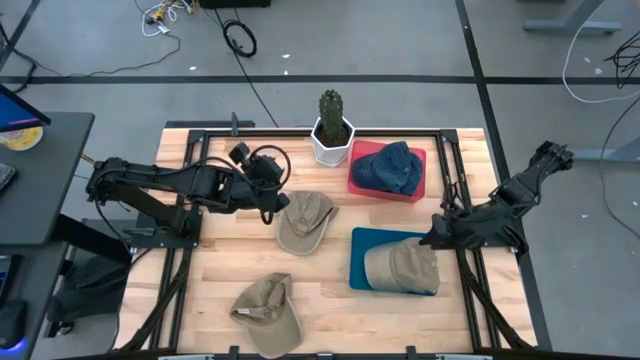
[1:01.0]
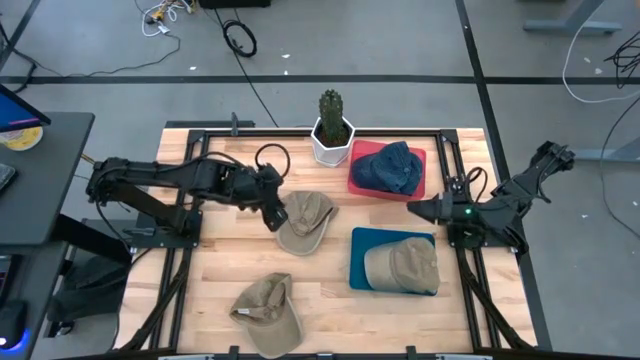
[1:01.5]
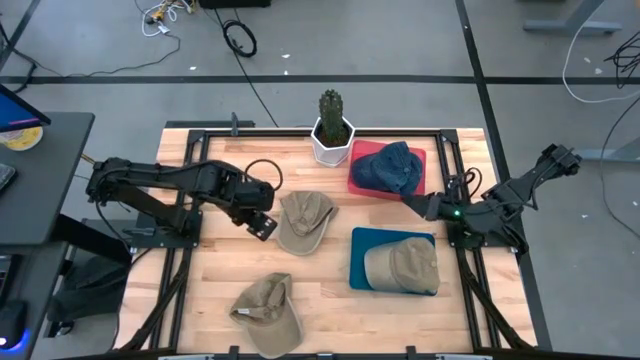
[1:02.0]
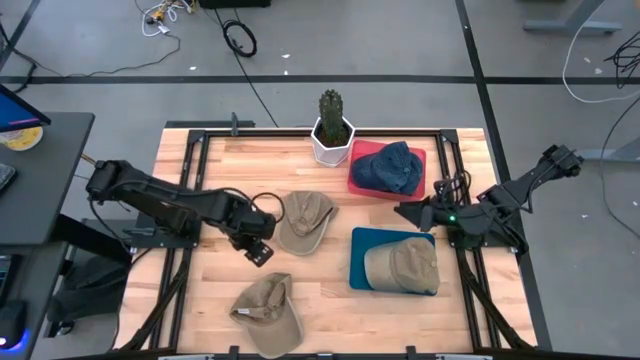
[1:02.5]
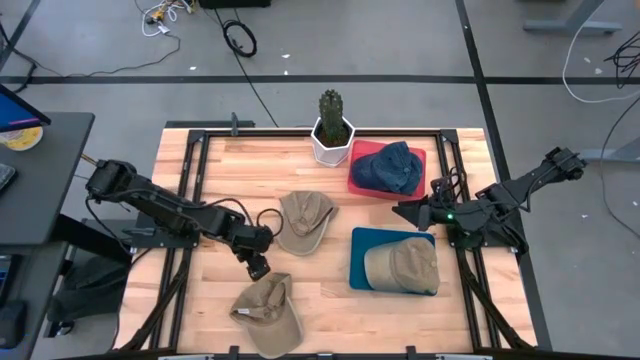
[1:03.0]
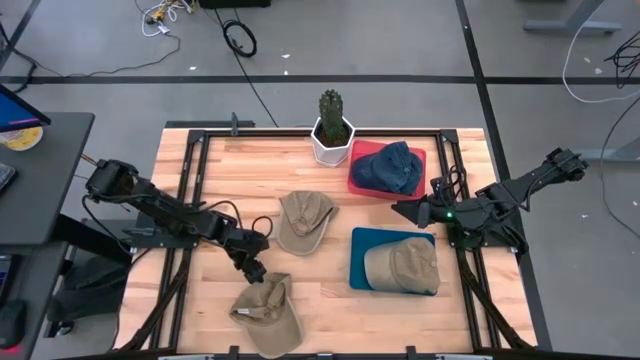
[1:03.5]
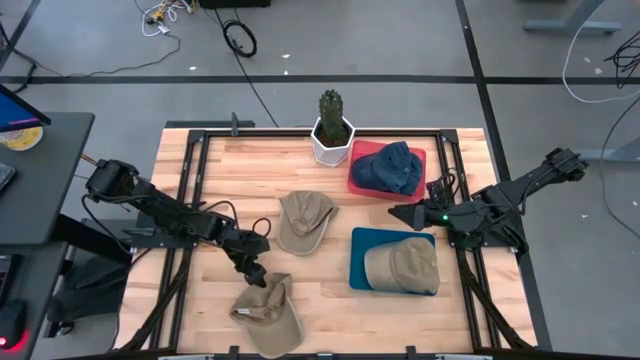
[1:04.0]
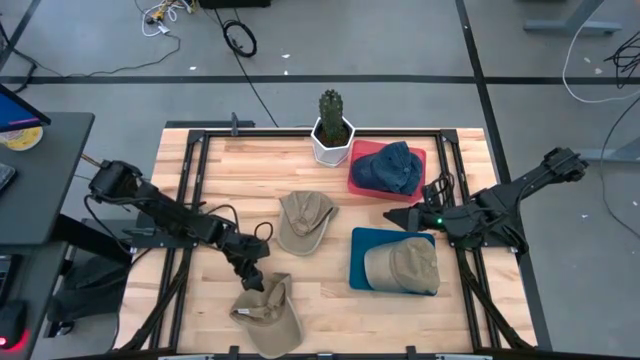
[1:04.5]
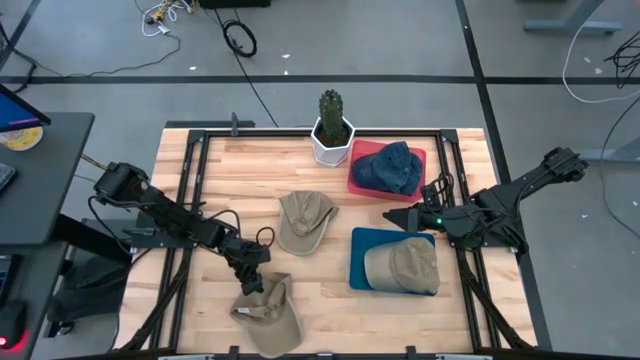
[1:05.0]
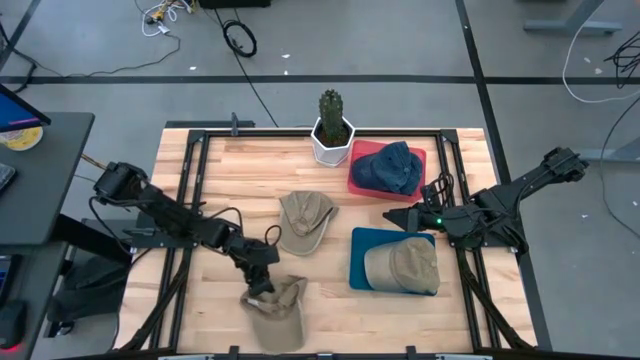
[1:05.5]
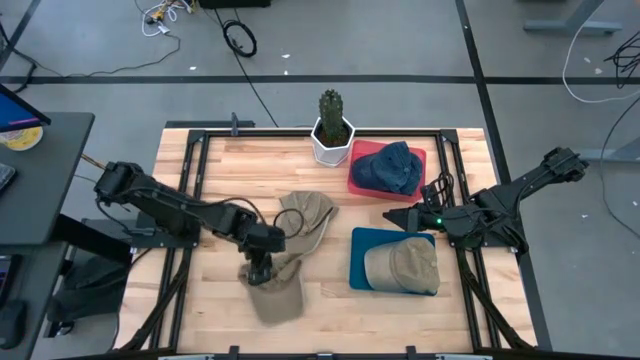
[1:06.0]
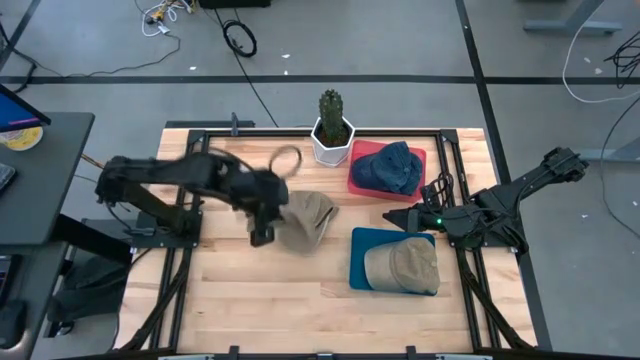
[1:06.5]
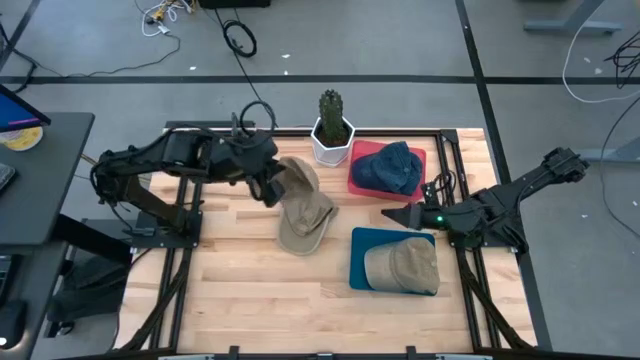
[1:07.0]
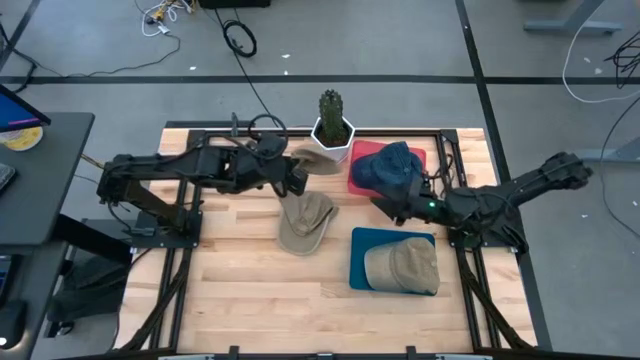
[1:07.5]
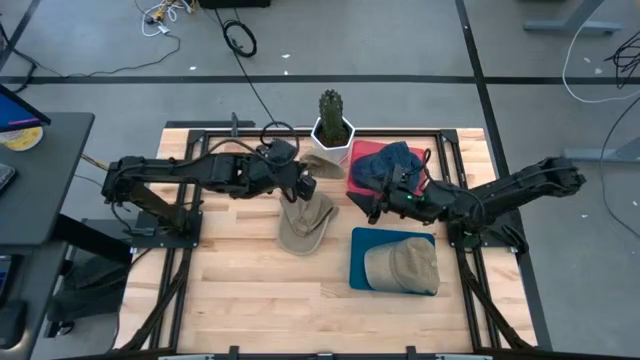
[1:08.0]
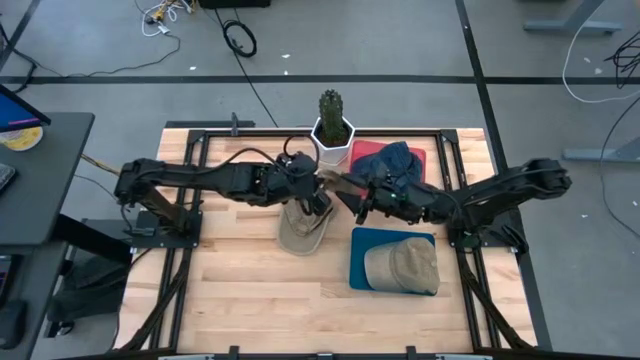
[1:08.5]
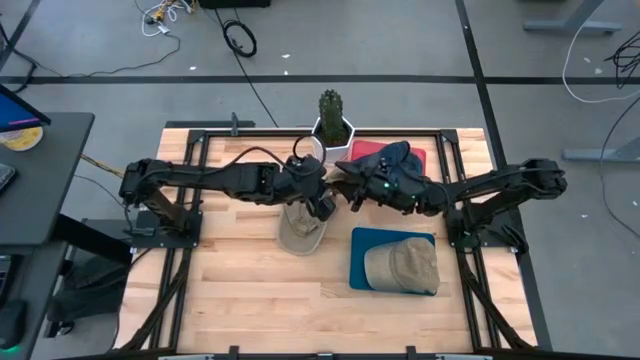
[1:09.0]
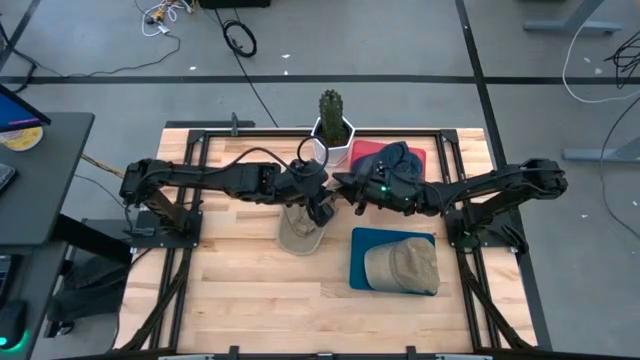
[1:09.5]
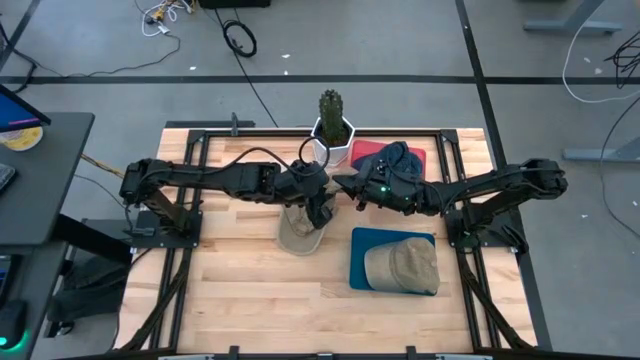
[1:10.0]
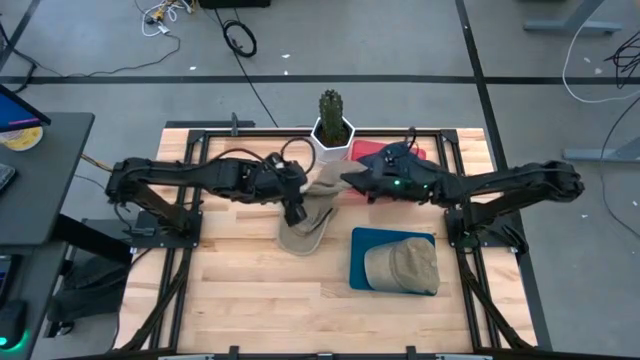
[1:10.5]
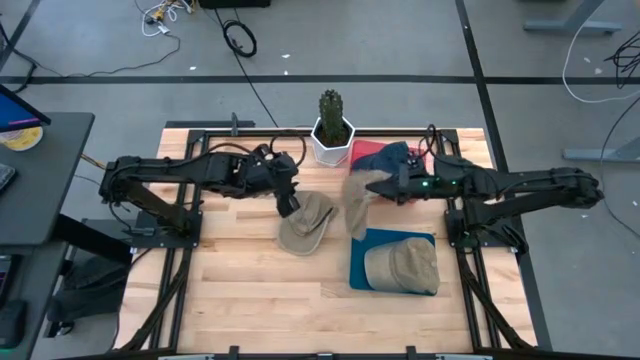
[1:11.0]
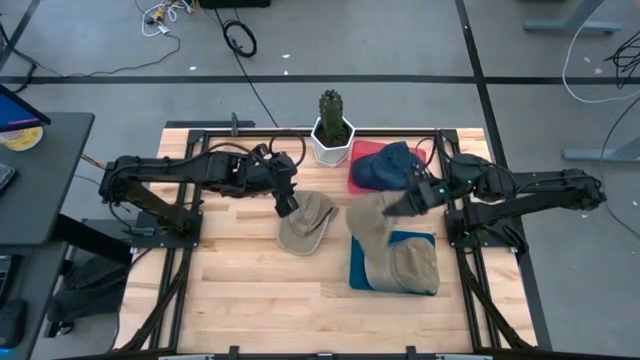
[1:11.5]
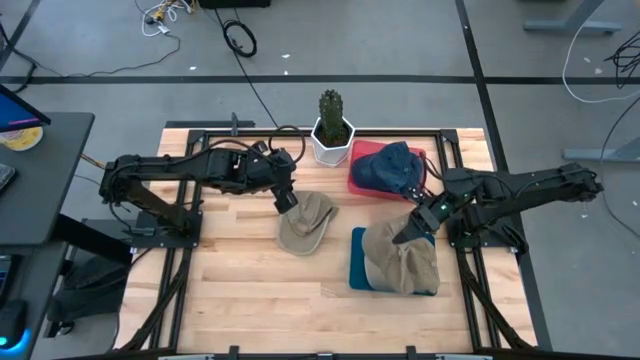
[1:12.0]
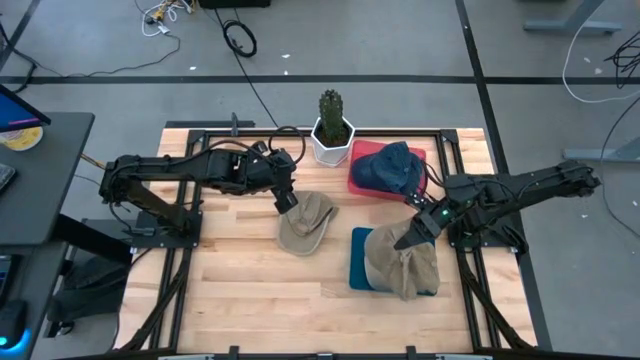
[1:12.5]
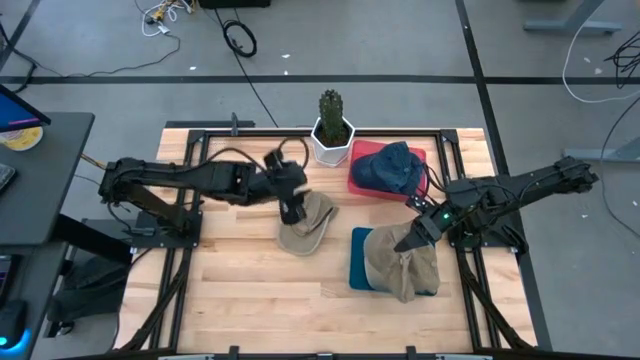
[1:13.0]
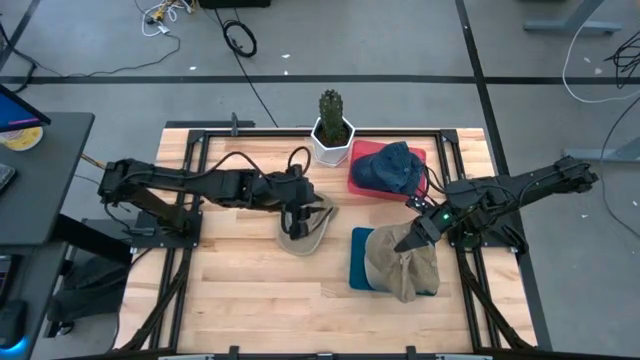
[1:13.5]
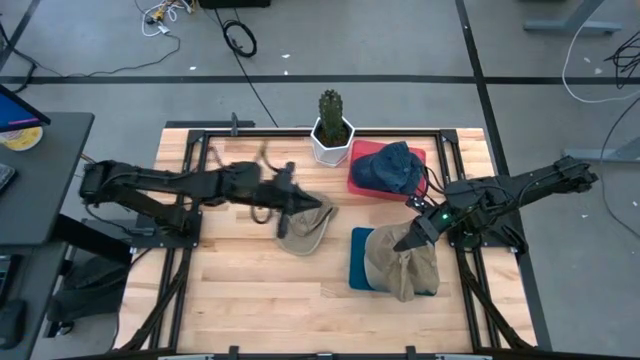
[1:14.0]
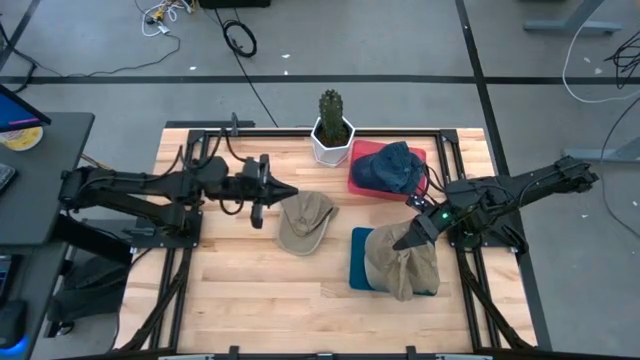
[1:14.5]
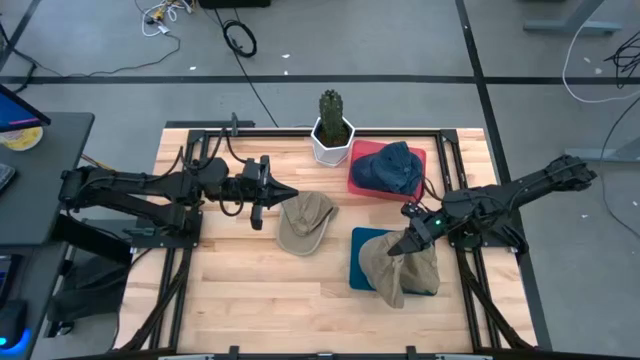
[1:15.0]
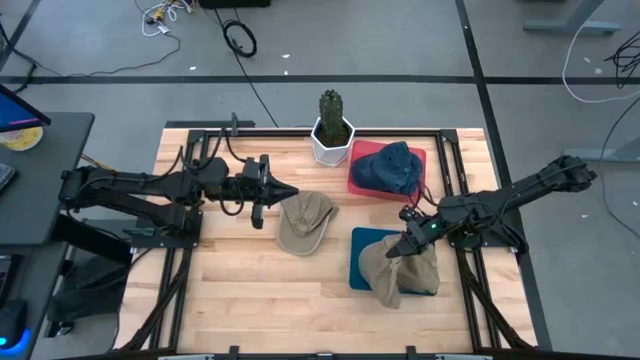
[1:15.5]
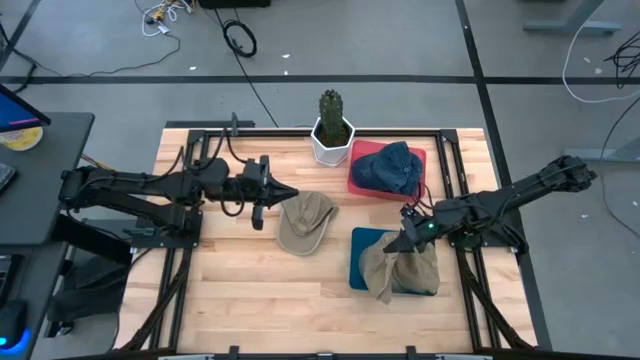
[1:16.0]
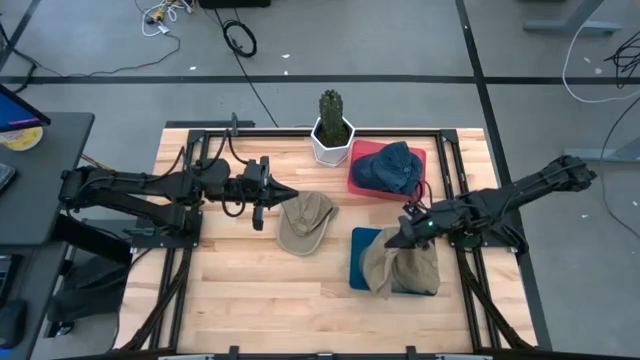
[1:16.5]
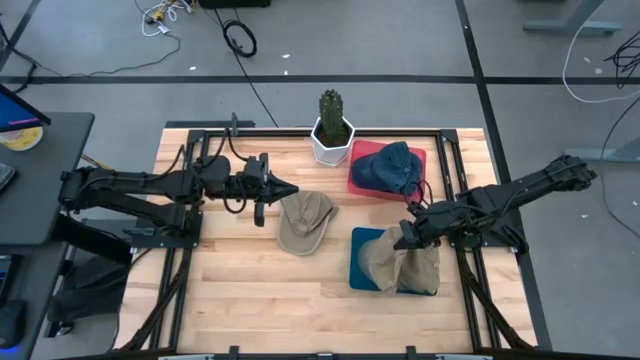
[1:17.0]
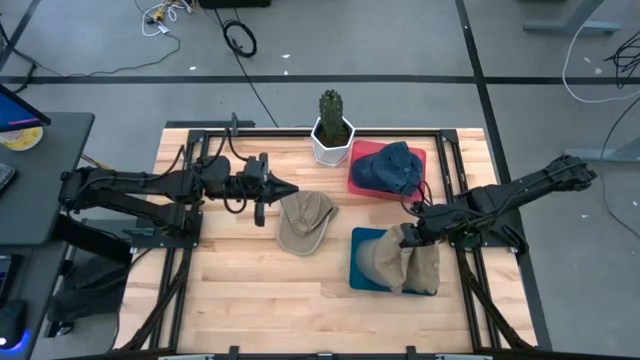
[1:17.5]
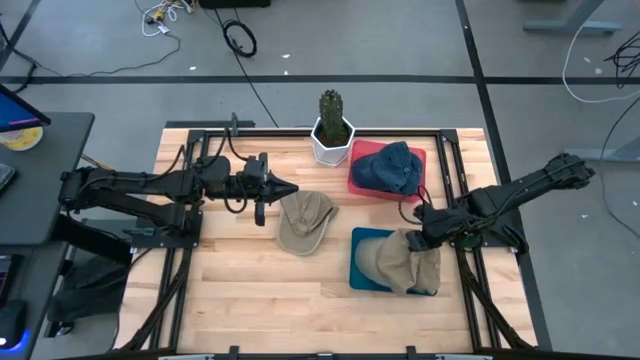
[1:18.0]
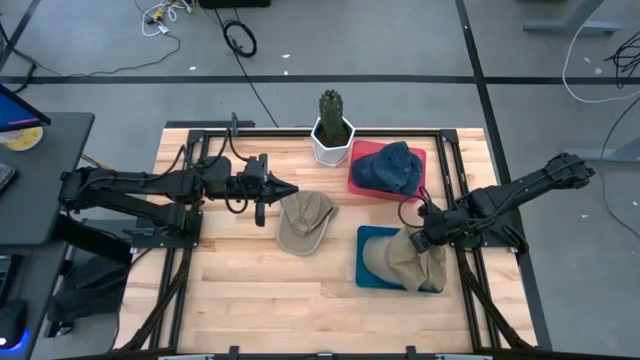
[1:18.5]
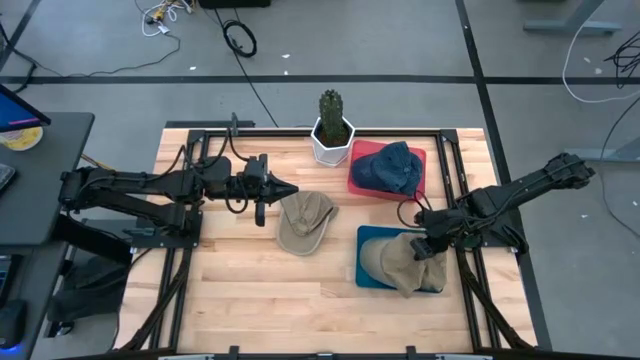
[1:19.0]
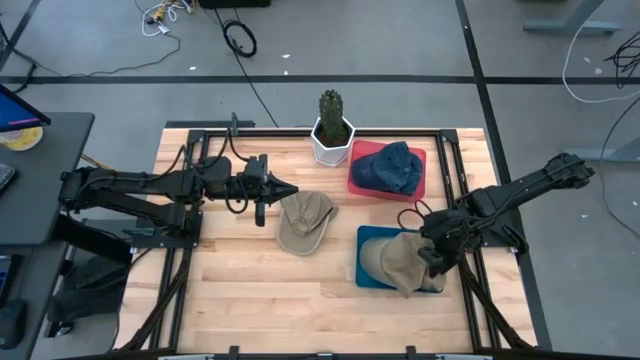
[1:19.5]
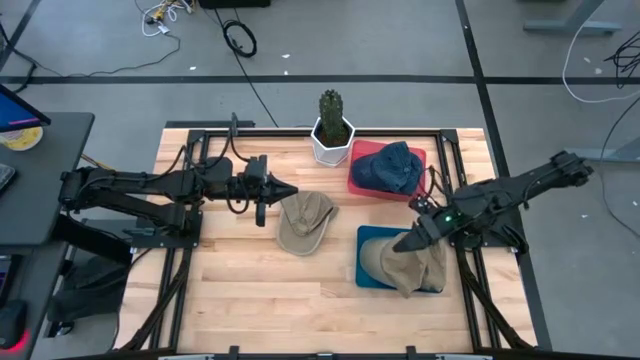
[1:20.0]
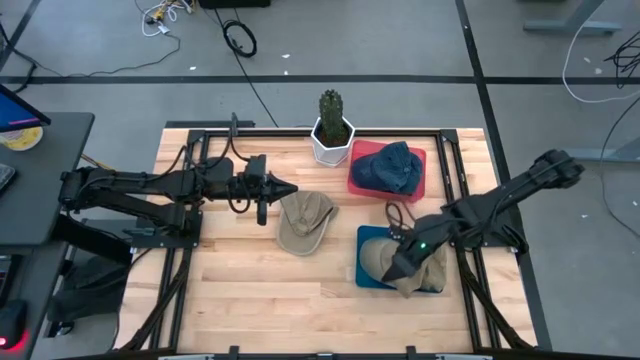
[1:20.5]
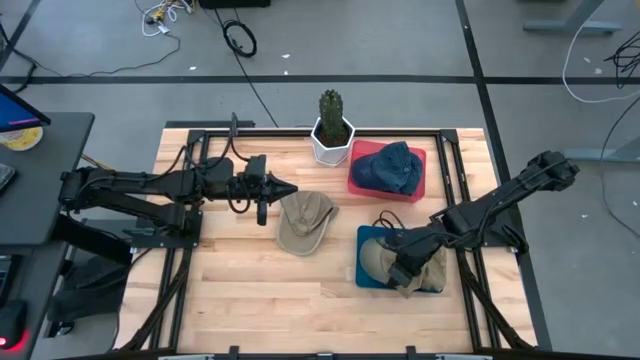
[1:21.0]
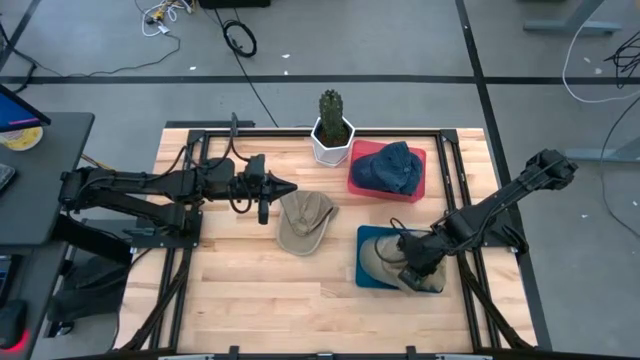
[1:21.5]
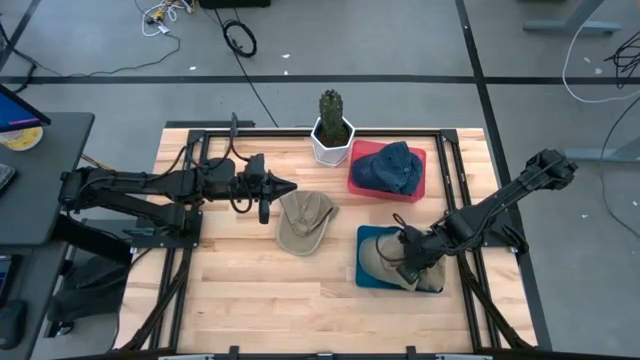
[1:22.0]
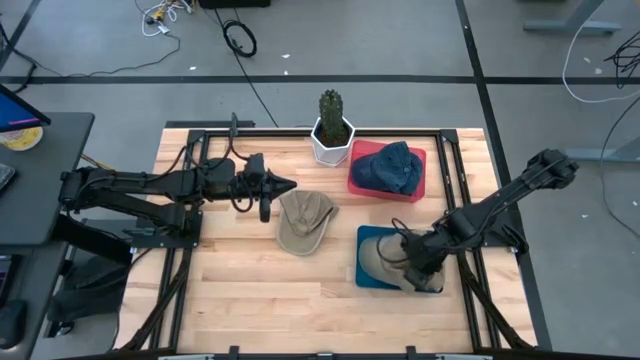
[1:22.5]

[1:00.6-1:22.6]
Task: Pick & Place hat
Put the bottom brown cap into the blue bin
